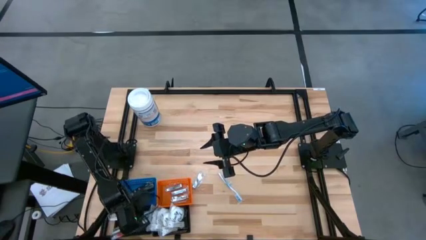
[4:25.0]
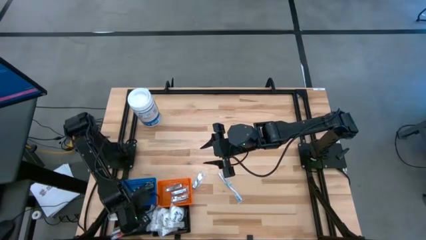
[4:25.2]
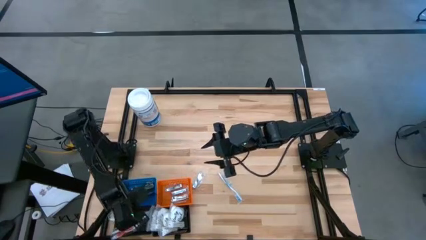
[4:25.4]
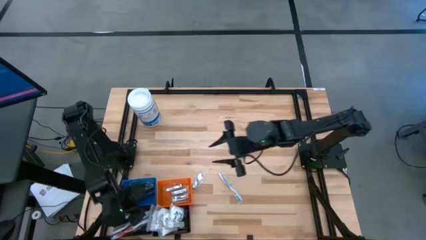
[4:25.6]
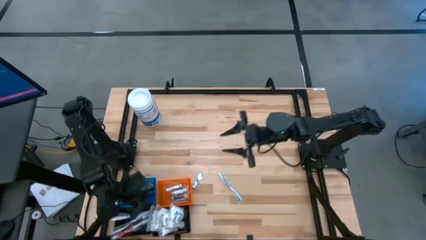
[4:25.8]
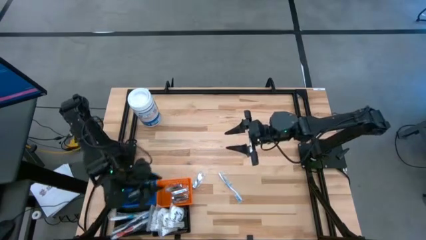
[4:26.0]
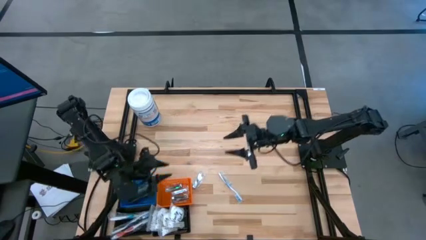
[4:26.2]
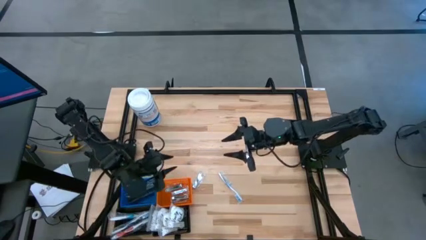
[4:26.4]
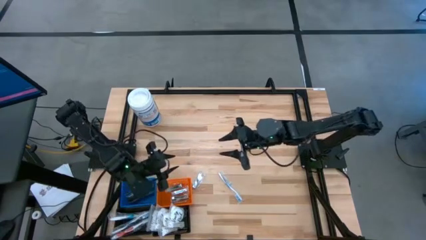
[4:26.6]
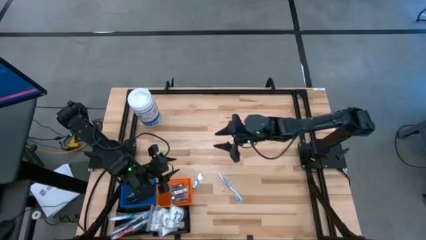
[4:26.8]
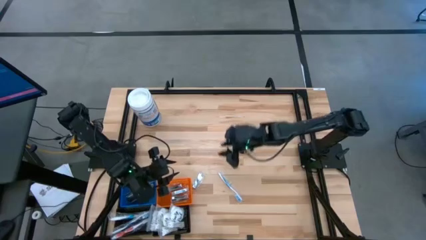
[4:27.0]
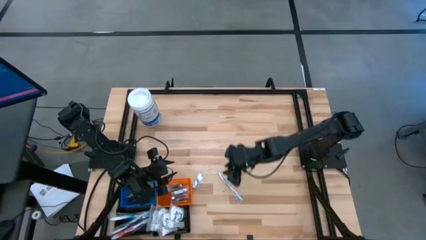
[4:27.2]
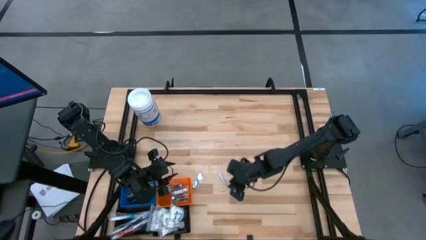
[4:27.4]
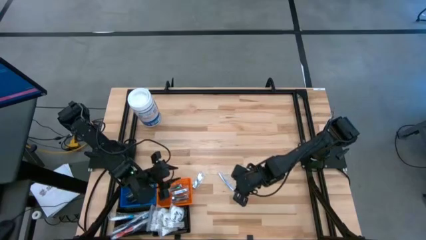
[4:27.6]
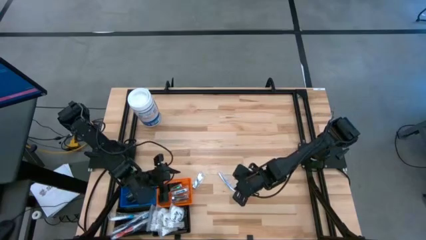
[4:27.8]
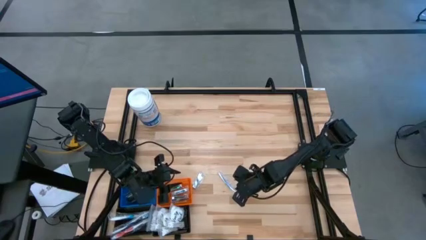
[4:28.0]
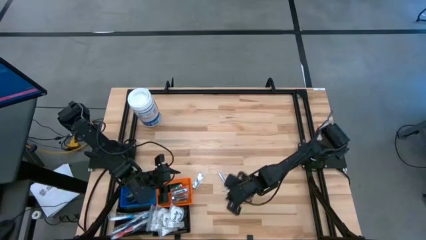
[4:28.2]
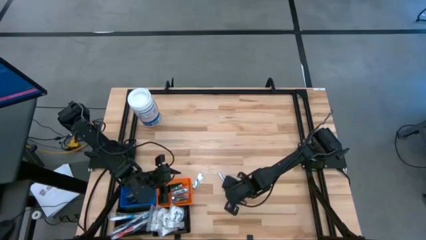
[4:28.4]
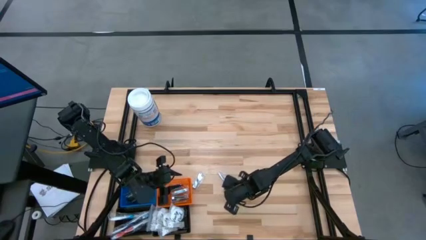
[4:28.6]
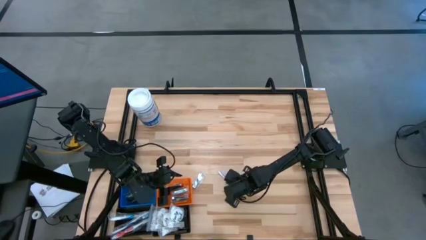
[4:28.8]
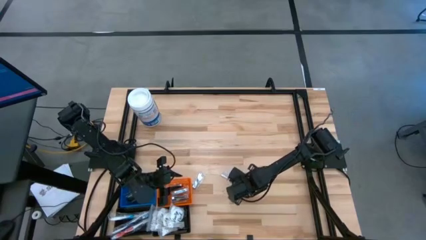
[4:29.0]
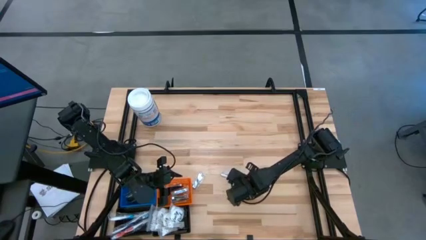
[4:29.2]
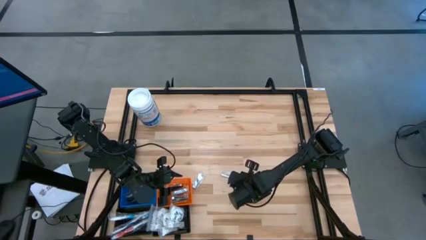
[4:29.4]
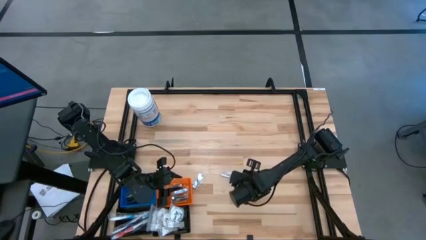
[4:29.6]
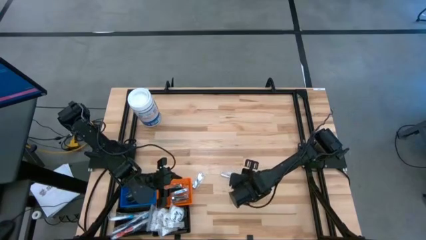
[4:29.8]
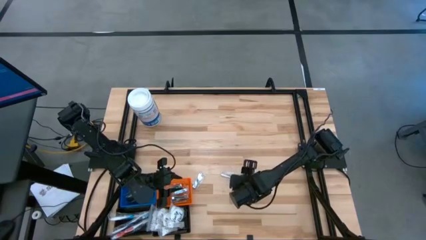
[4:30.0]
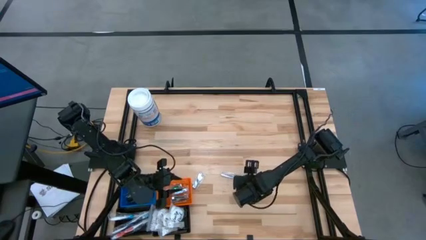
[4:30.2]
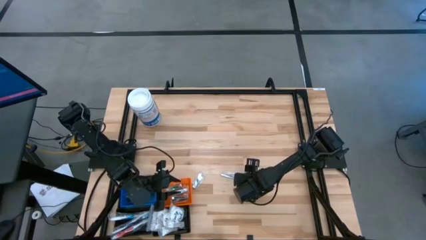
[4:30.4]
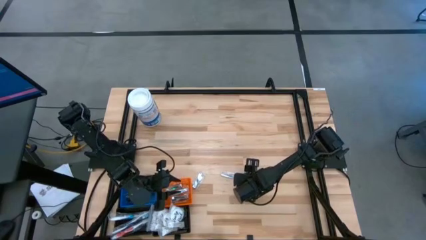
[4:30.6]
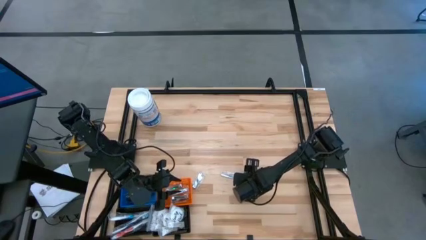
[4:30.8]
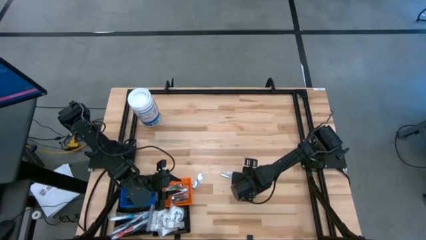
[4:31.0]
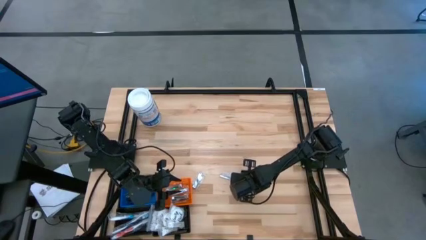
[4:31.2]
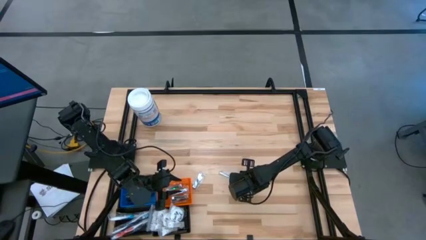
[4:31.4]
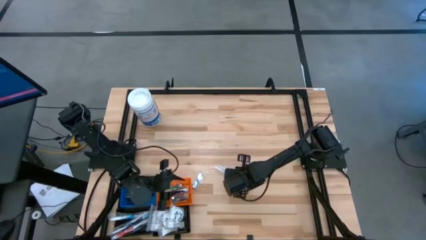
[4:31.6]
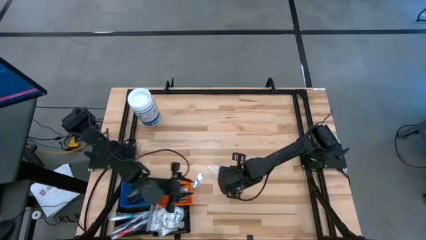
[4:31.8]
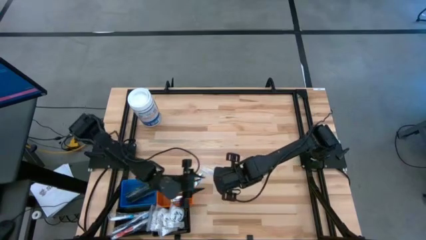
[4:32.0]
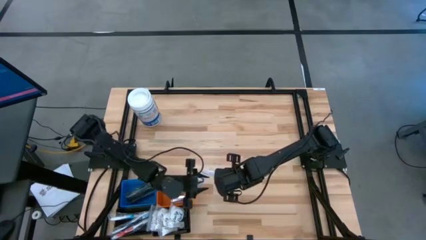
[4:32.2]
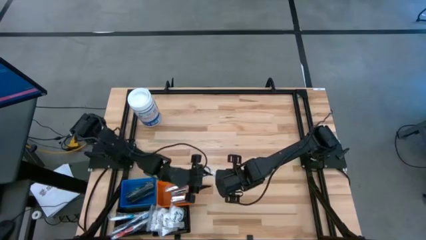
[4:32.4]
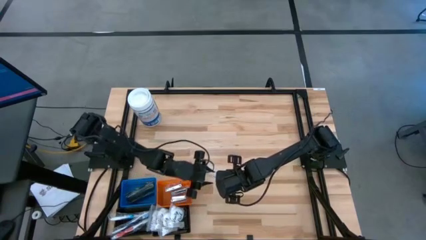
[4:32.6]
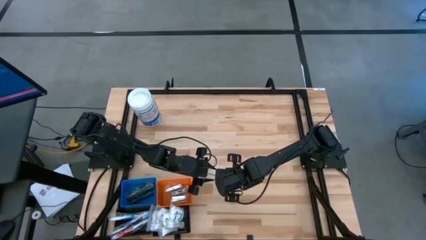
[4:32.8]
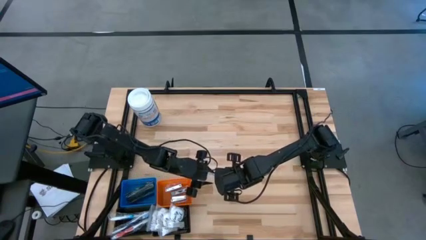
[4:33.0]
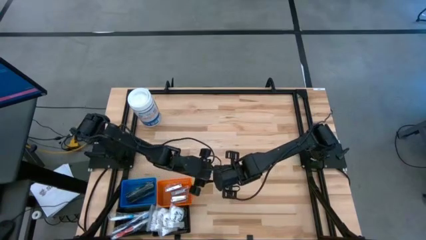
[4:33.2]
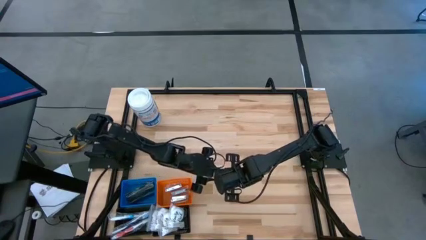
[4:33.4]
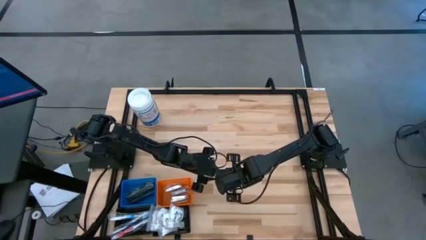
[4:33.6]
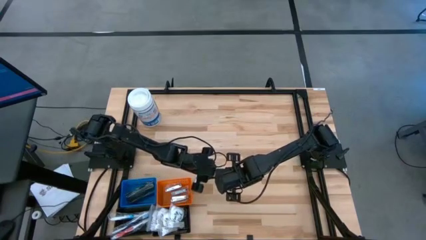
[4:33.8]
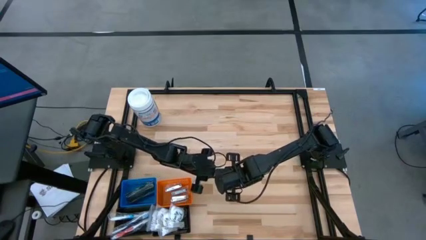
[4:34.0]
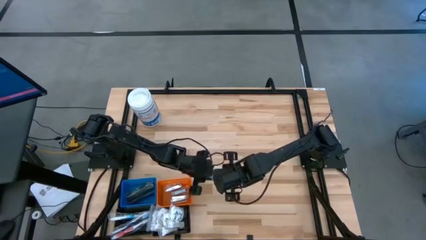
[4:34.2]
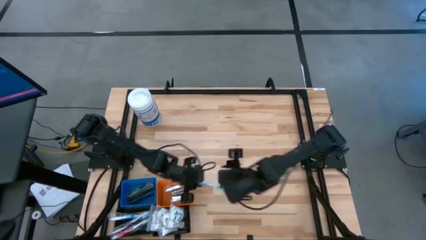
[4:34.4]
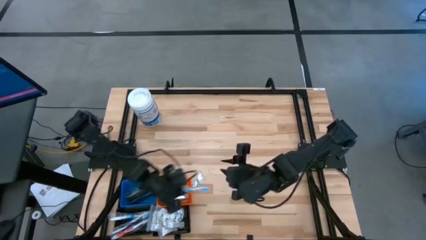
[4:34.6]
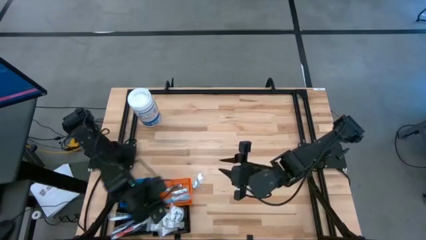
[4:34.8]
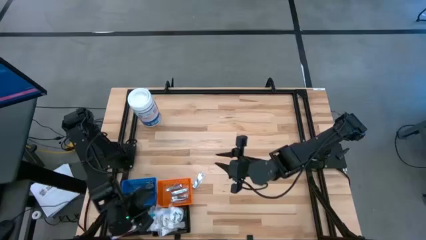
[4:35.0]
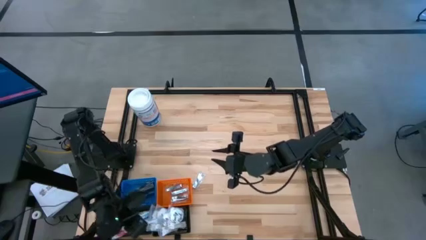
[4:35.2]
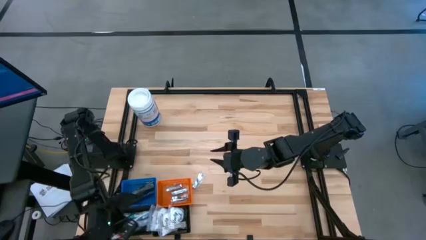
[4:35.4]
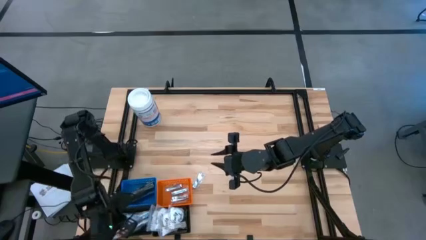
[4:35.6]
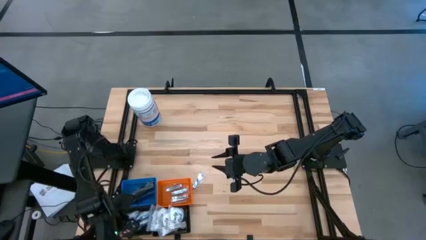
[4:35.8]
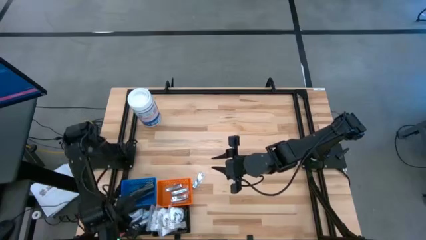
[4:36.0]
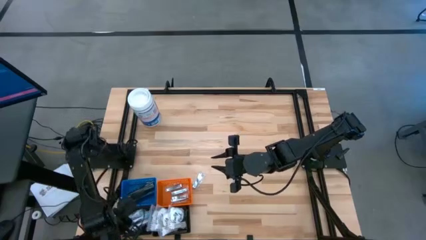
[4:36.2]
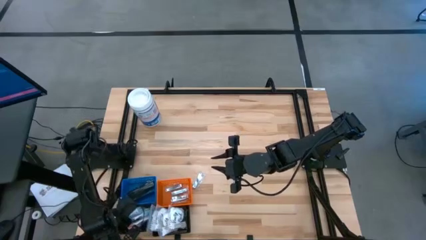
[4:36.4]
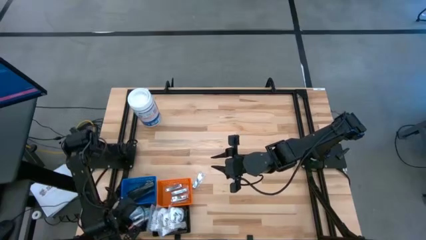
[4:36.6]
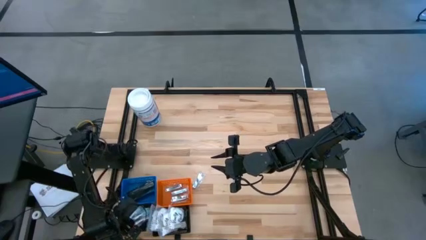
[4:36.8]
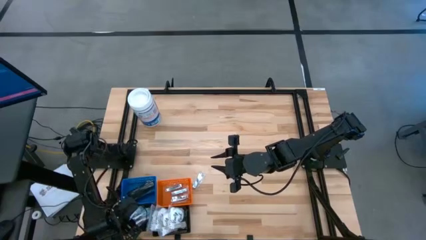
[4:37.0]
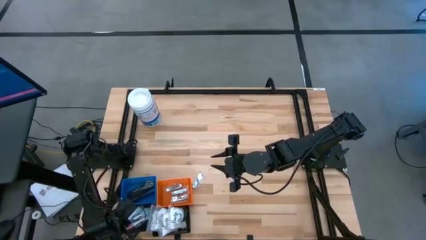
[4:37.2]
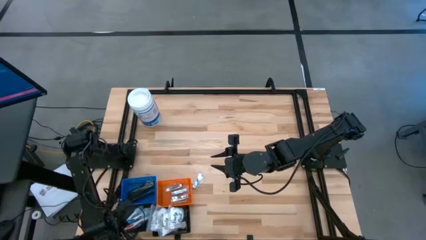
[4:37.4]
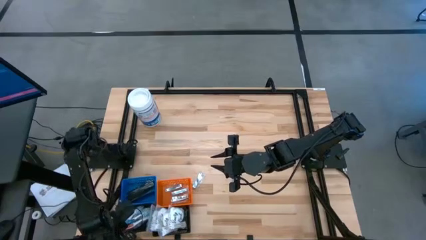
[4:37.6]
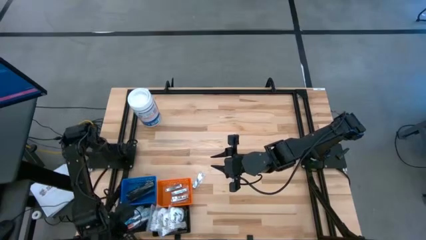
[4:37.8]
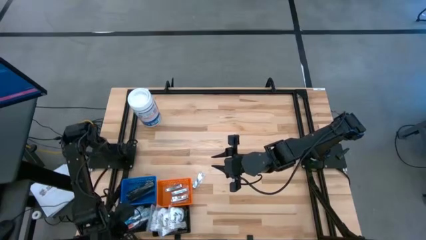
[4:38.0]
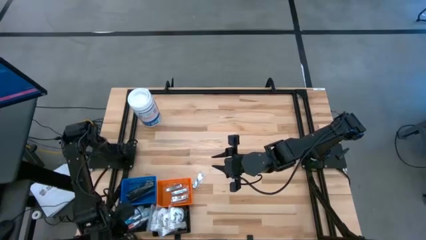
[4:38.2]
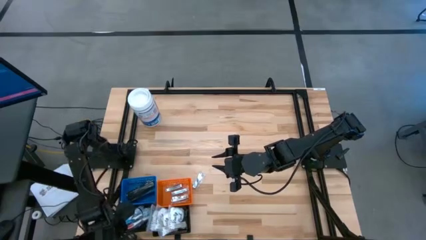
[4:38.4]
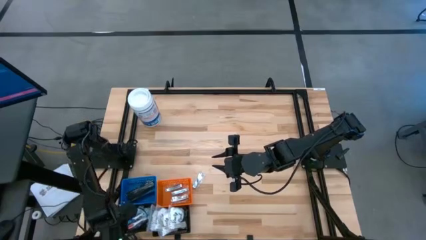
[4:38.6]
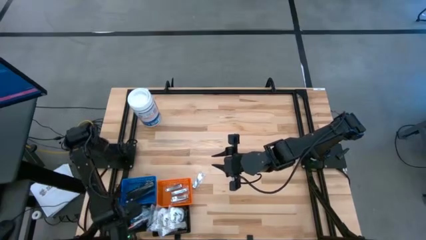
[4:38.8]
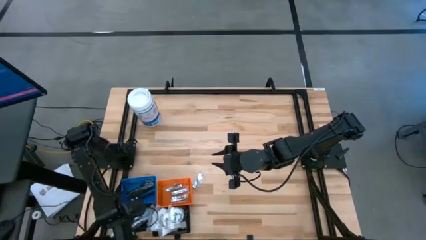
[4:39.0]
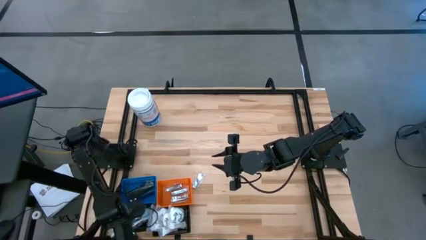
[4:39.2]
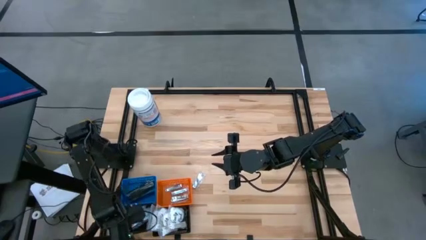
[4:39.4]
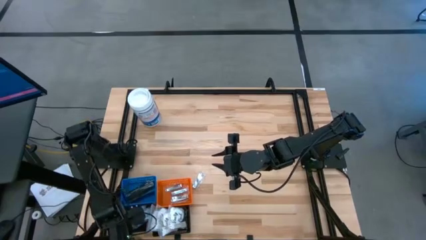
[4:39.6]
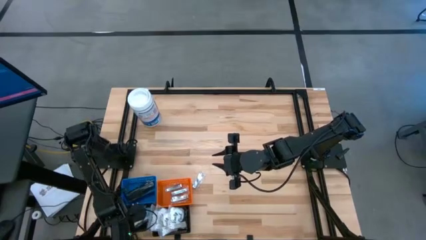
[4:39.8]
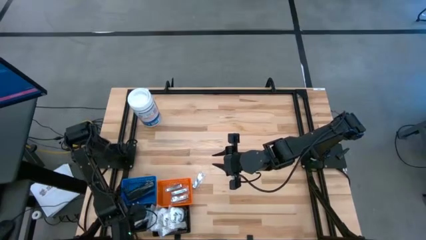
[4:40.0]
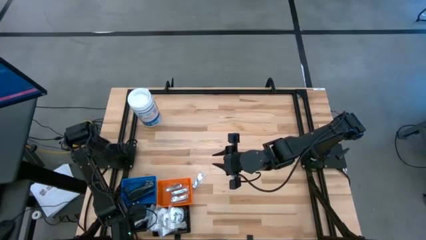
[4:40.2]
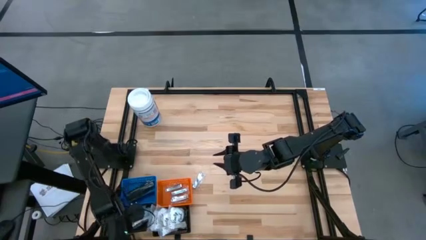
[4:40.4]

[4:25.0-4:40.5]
Task: Pick & Place Travel size toiletries
Put the blue toothbrush into the left black basket

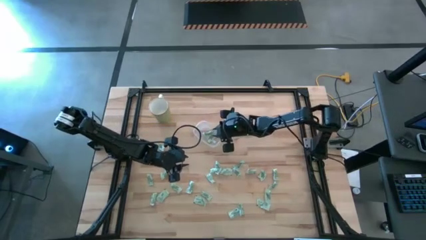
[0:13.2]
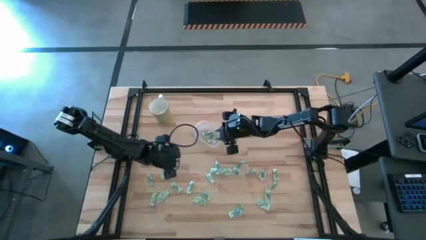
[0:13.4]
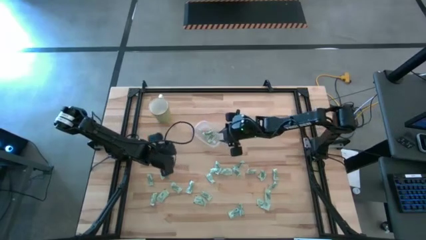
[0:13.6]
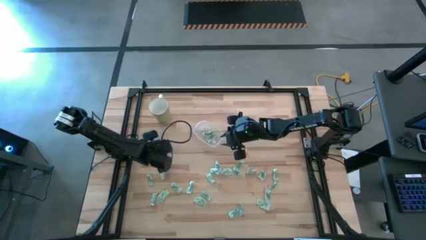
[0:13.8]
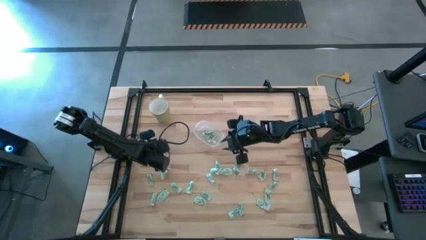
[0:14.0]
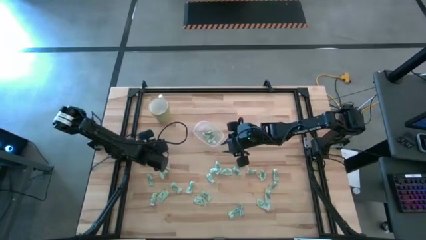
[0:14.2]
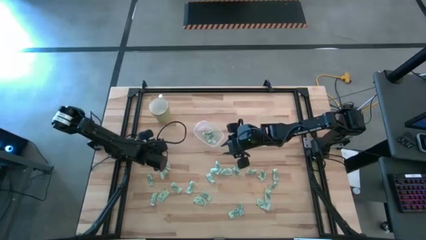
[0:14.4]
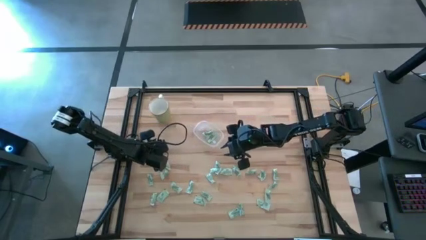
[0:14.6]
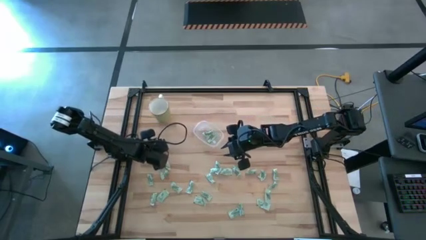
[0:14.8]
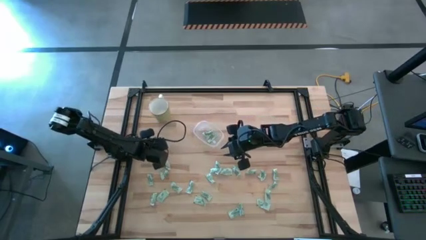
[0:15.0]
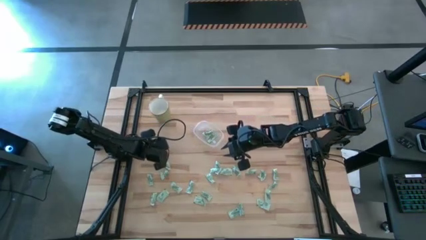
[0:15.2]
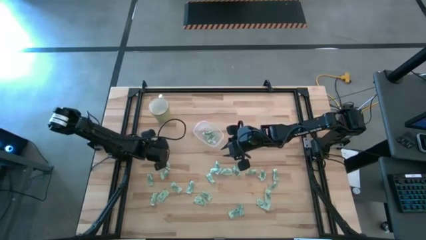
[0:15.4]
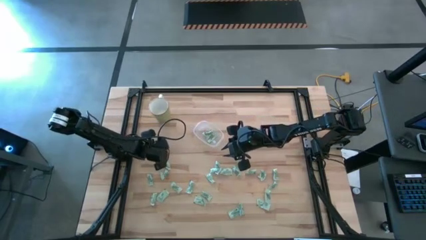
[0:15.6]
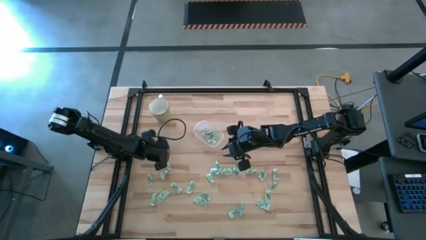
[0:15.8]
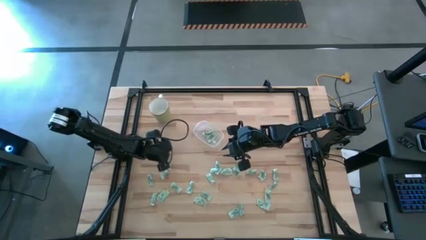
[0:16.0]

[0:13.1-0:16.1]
Task: Pick and place Stevia / Truvia into bins
Put the stevia packet into the transparent container
